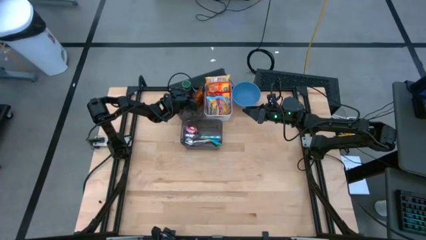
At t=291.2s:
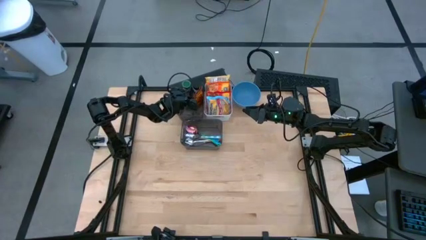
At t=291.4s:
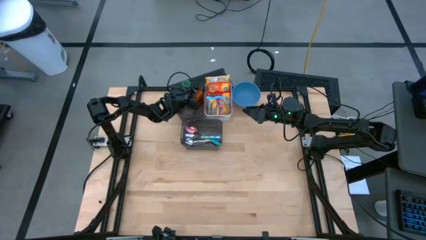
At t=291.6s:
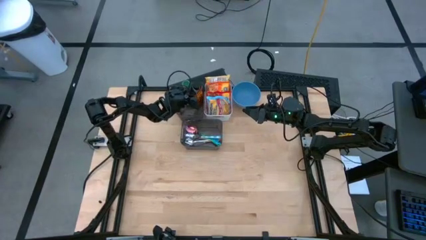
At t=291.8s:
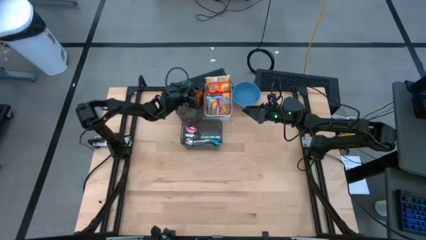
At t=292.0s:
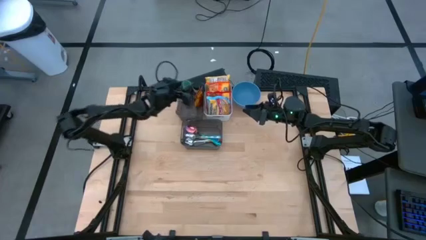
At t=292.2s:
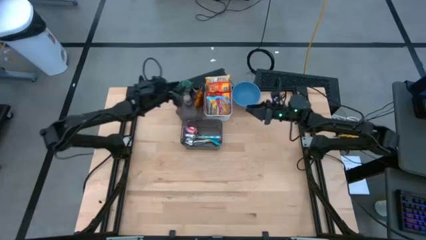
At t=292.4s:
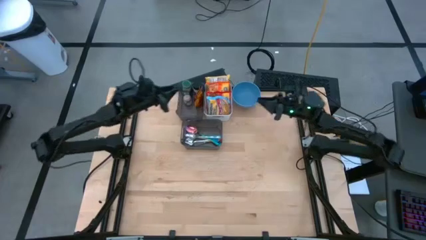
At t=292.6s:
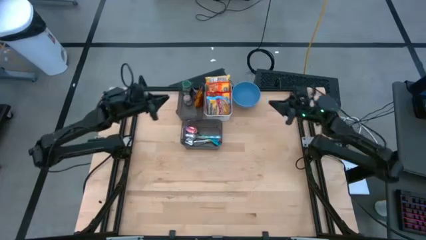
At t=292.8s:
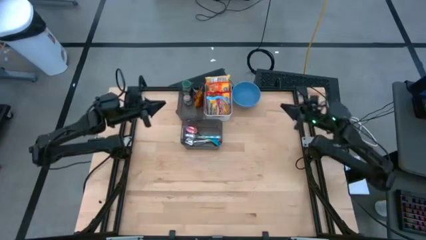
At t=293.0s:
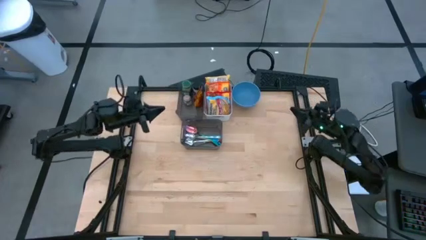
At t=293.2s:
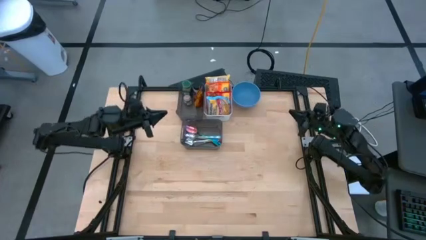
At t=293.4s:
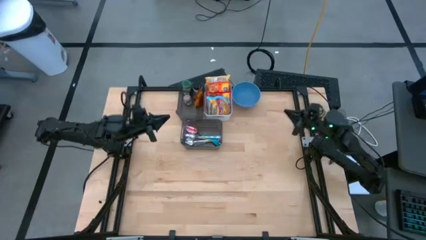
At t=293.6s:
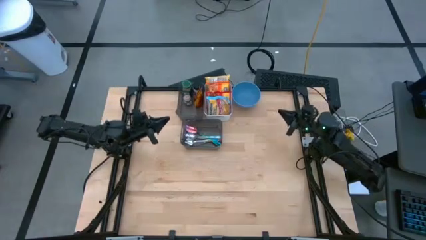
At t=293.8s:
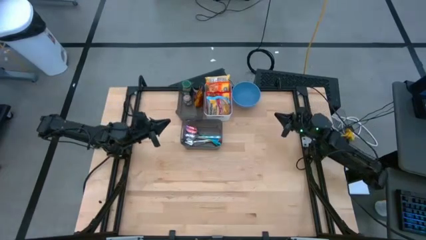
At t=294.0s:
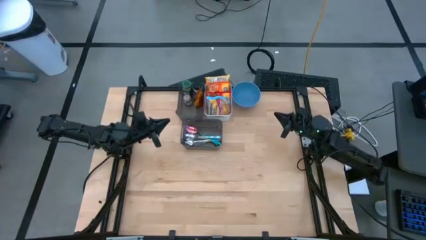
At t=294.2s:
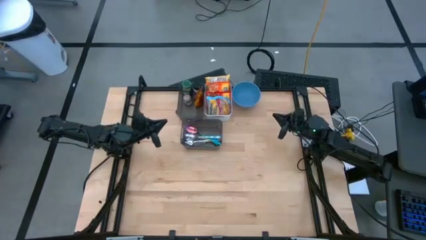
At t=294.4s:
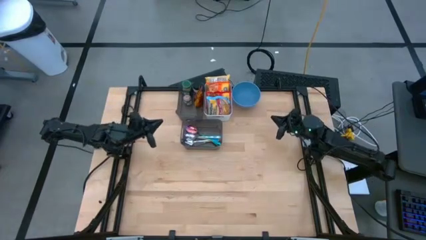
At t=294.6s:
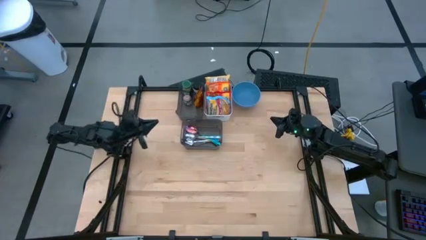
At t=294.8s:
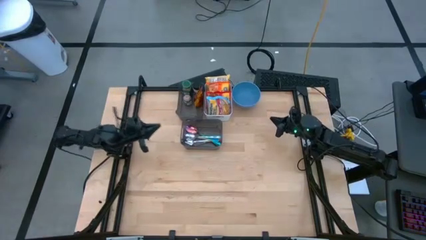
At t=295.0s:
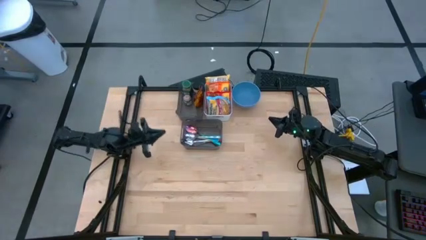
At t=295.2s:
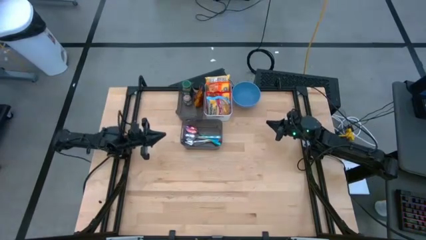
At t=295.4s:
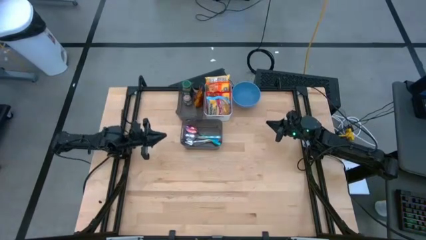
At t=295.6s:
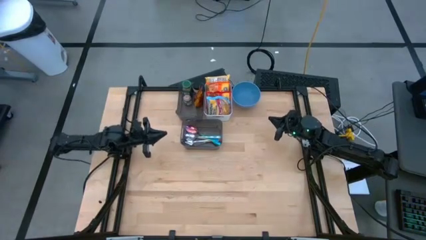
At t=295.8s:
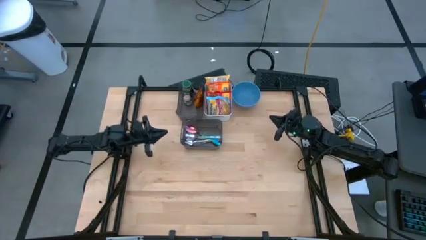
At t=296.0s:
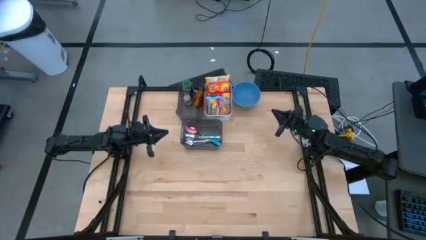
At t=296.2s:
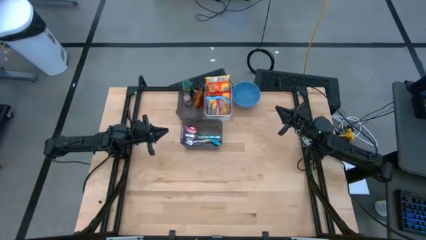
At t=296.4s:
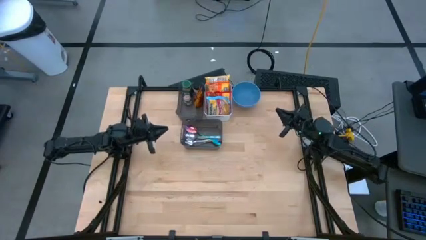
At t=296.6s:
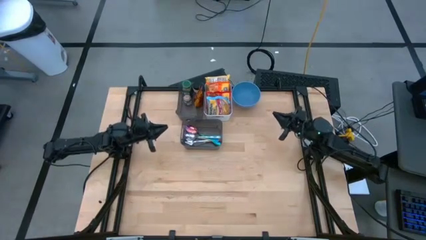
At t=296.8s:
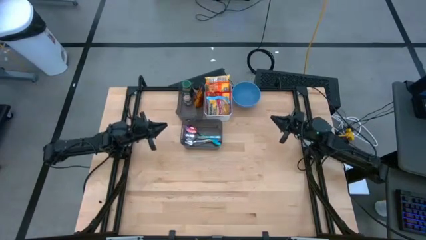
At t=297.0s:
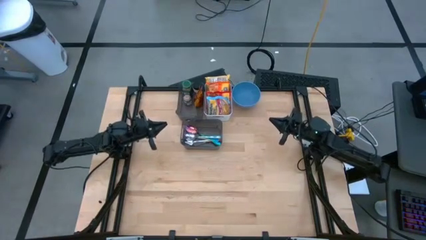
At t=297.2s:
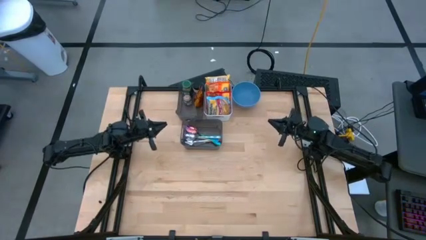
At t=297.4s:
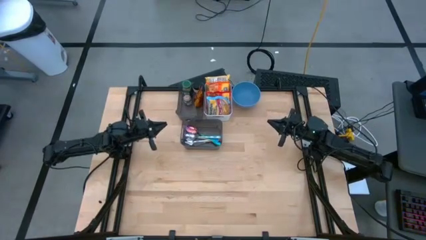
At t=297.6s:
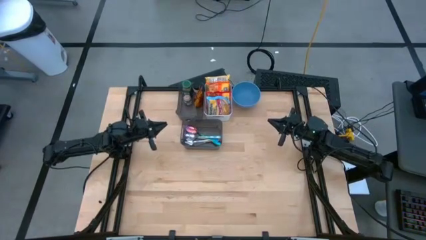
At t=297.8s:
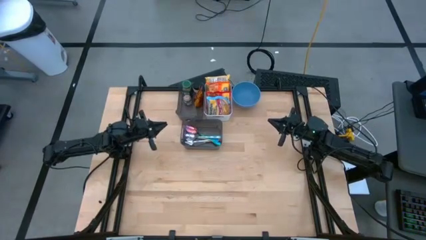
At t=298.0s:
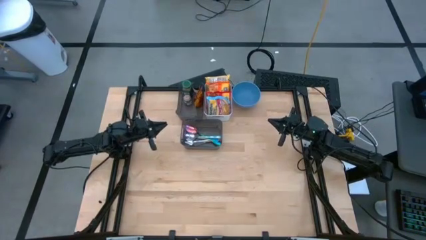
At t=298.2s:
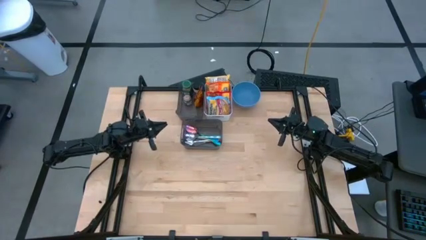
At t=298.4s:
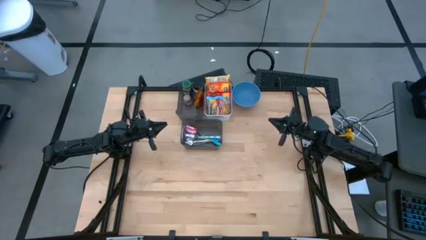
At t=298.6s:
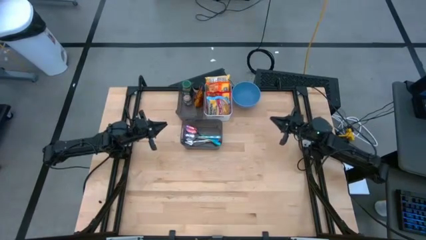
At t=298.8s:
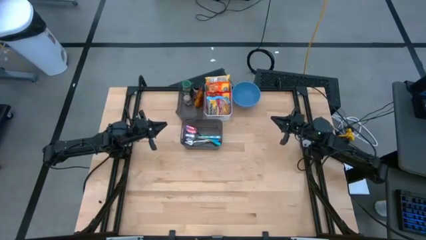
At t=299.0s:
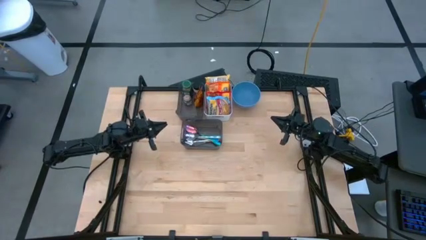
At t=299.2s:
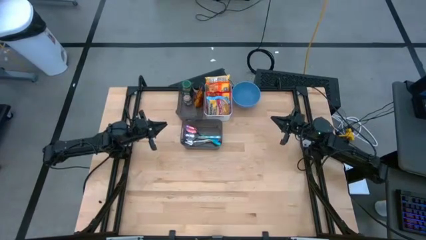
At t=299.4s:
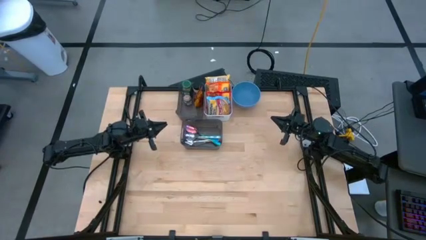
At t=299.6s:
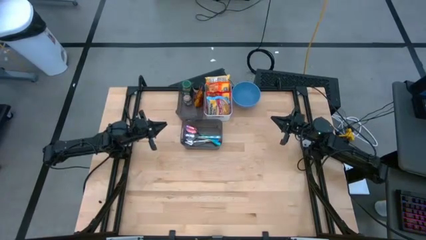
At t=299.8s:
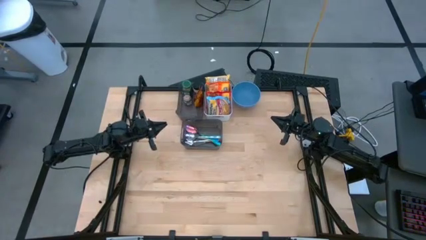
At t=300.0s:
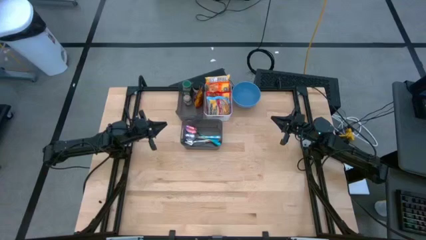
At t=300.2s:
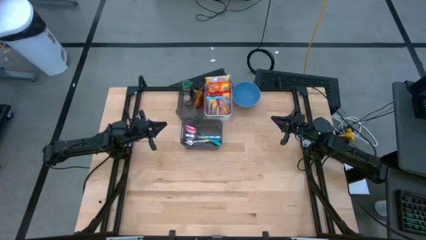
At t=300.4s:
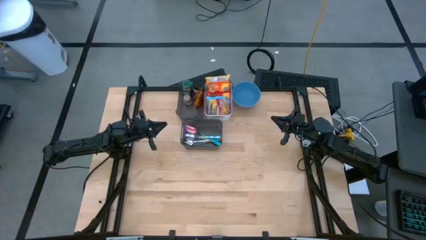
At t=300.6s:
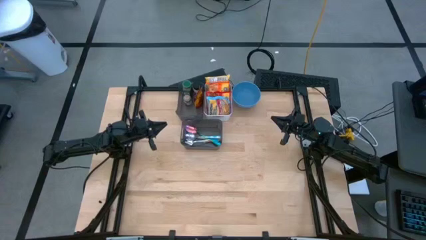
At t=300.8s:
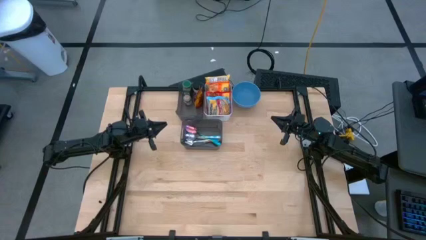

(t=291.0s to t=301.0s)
Task: Pick & Place Food Item
Return to Home Position

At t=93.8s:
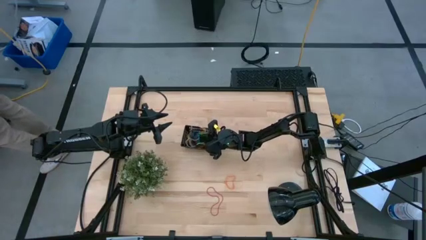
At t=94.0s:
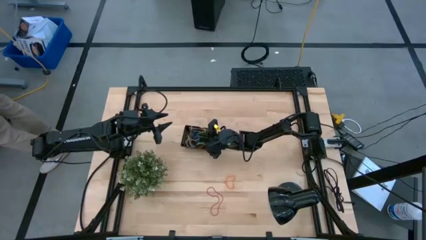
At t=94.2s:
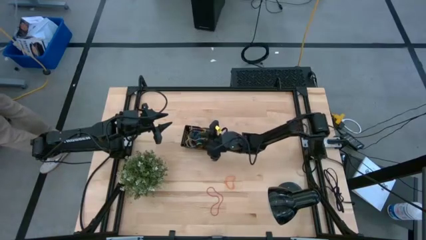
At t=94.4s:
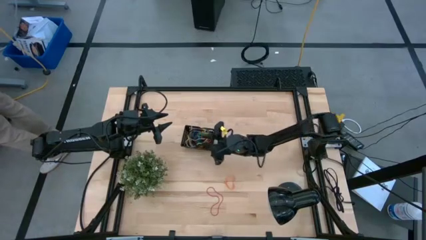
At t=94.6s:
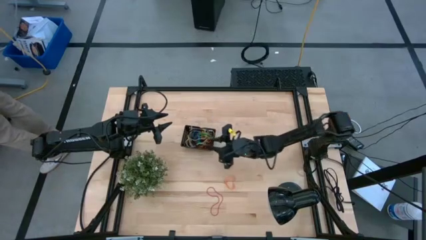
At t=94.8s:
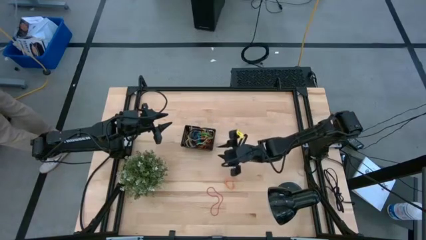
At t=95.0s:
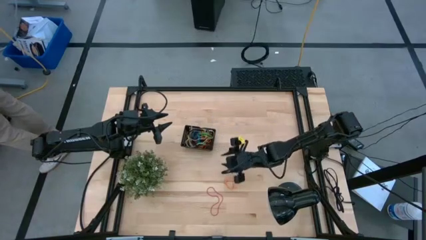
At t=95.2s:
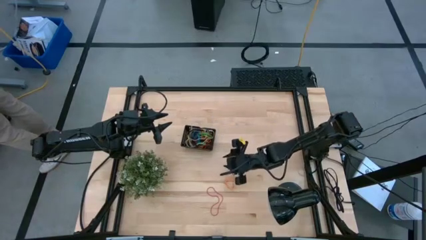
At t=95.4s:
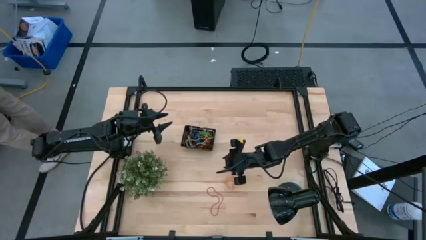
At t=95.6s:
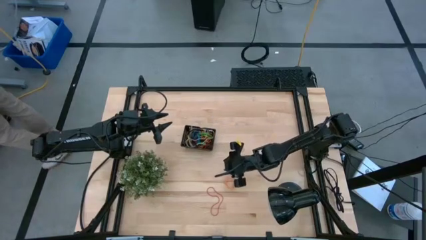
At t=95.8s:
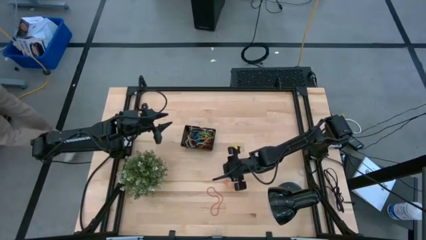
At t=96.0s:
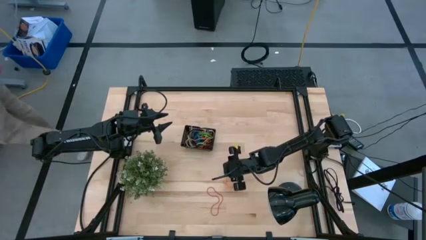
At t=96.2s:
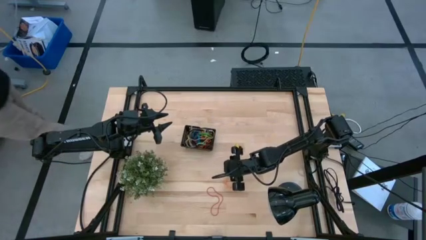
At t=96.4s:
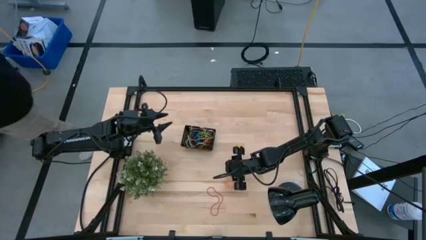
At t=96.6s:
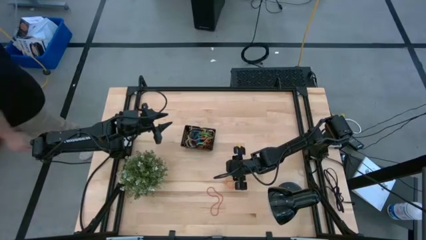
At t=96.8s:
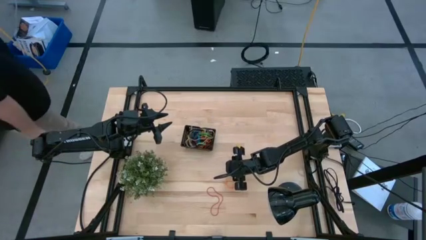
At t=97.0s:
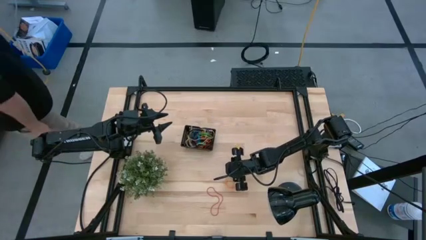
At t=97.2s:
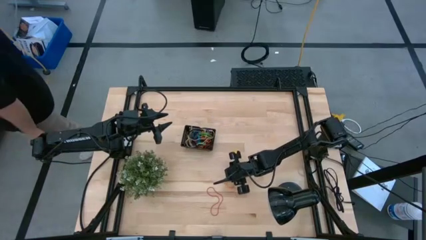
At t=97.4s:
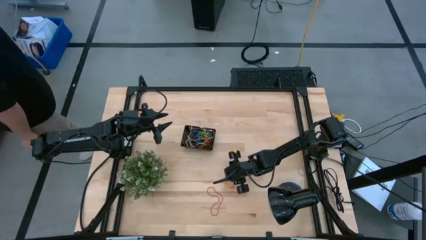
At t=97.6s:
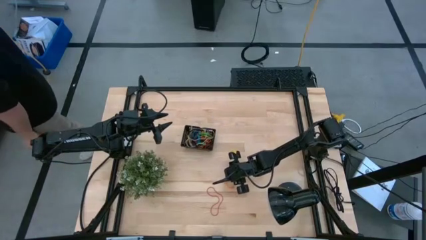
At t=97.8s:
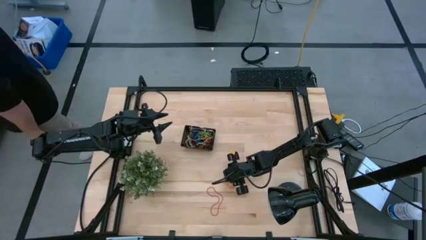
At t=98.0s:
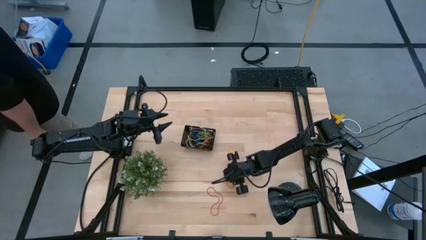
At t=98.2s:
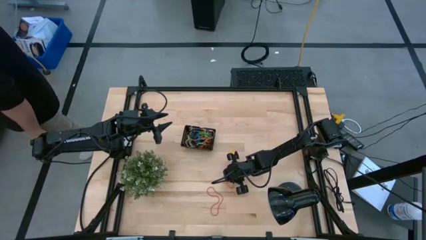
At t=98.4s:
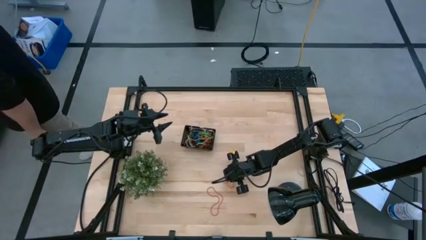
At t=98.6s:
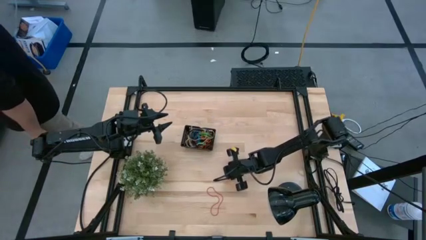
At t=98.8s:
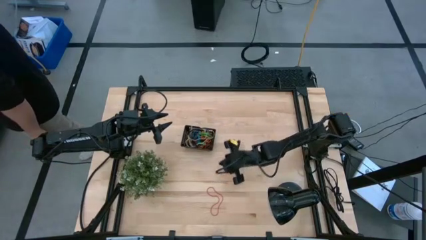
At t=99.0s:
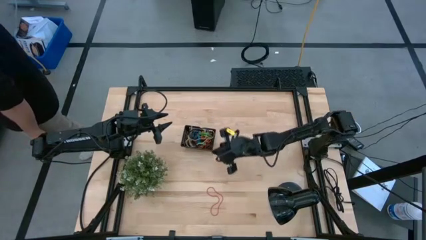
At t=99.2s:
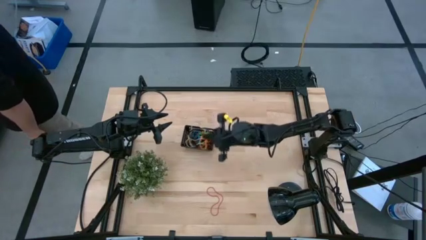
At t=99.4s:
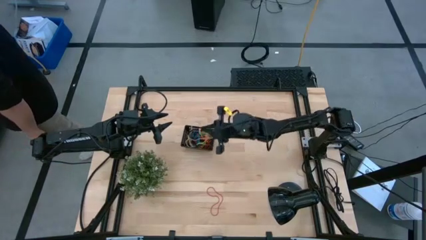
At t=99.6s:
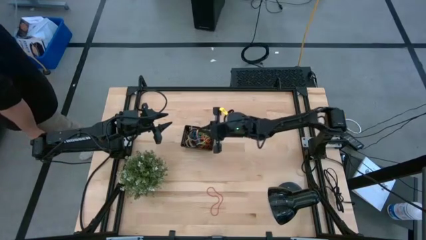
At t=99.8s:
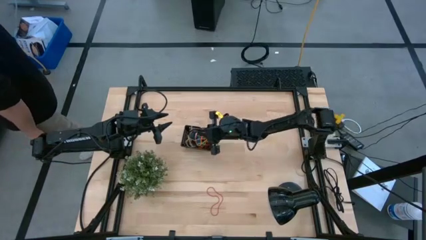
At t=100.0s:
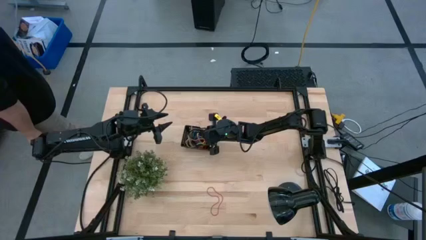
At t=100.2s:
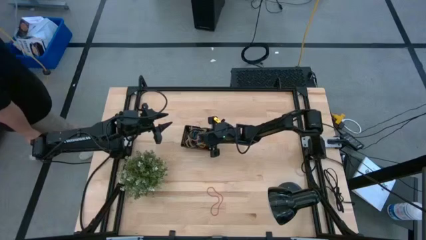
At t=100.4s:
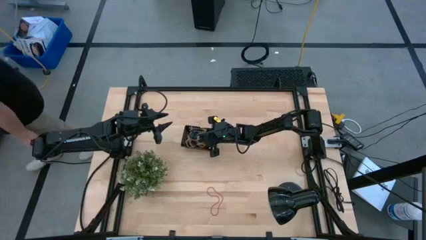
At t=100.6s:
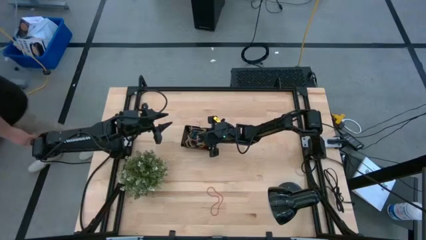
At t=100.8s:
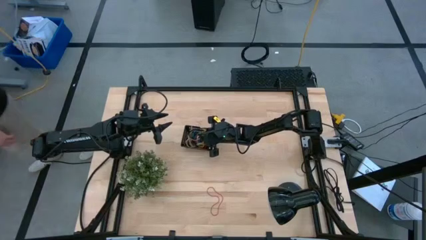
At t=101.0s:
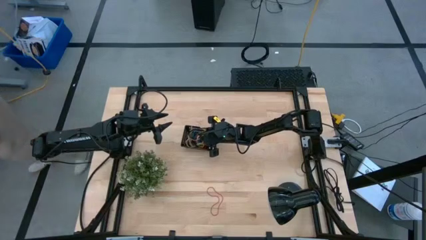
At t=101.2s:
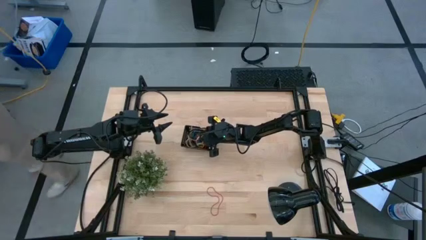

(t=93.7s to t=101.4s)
Task: Pick and place rubber bands into bin
Put the orange rubber band into the black bin
